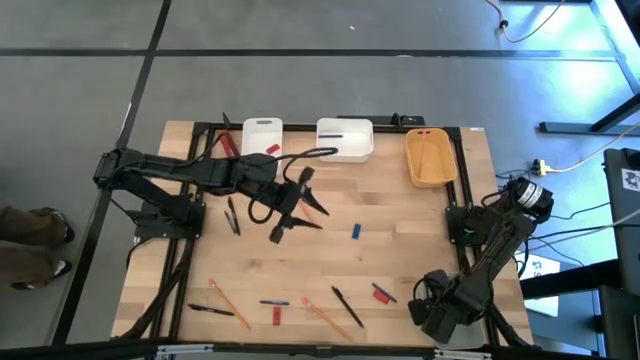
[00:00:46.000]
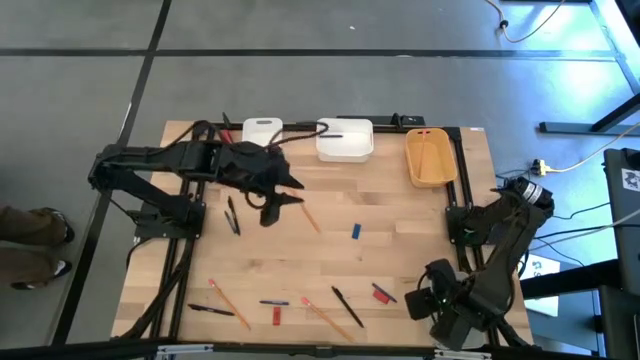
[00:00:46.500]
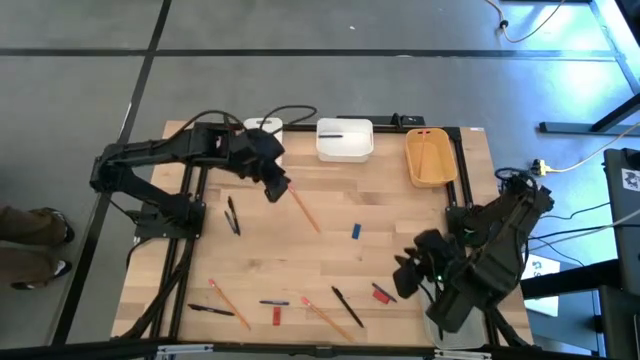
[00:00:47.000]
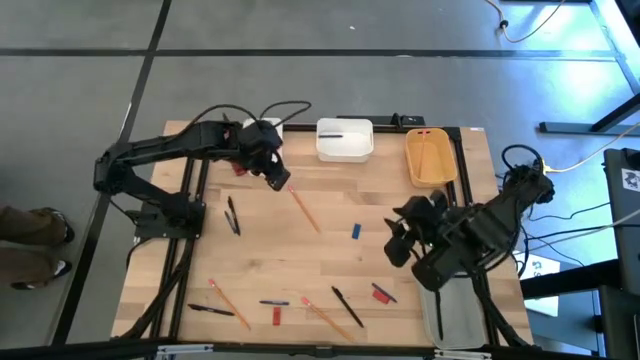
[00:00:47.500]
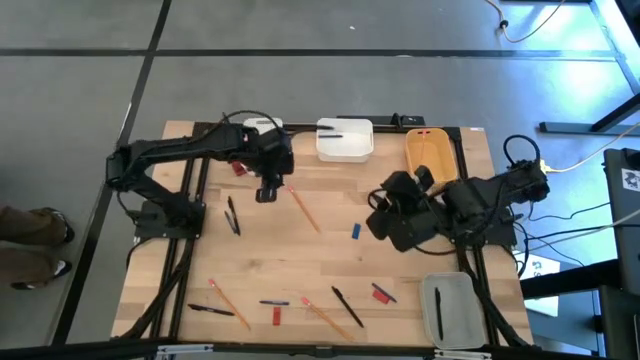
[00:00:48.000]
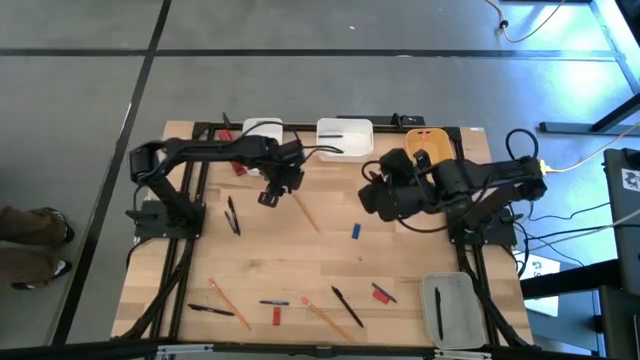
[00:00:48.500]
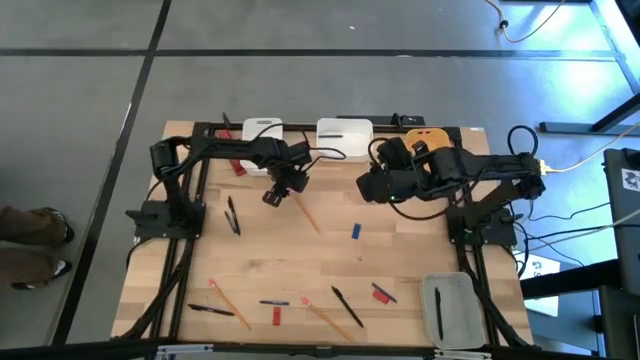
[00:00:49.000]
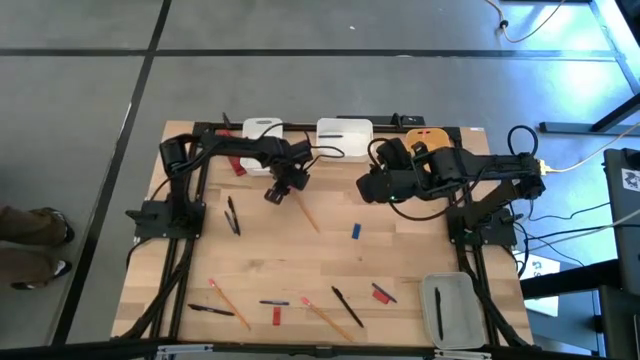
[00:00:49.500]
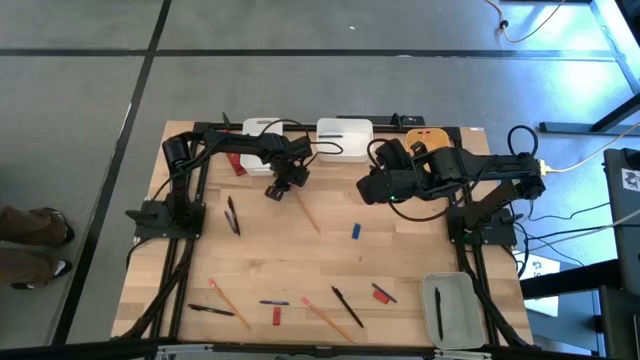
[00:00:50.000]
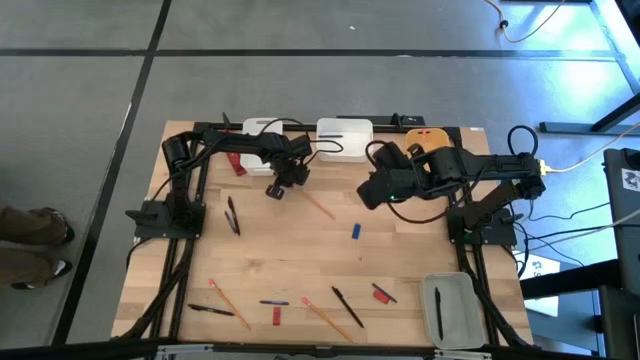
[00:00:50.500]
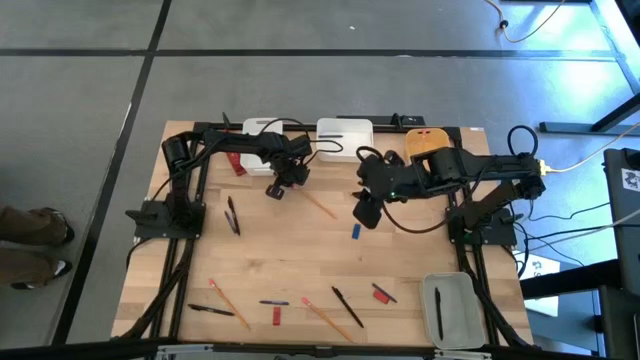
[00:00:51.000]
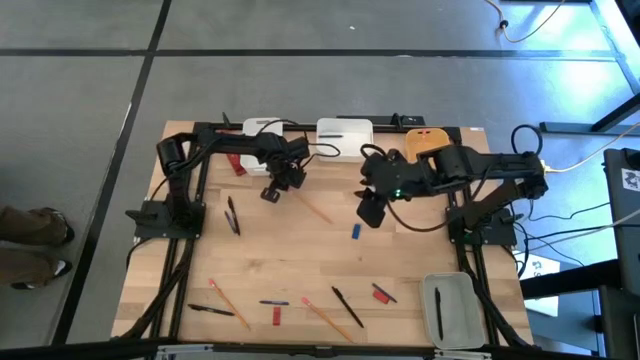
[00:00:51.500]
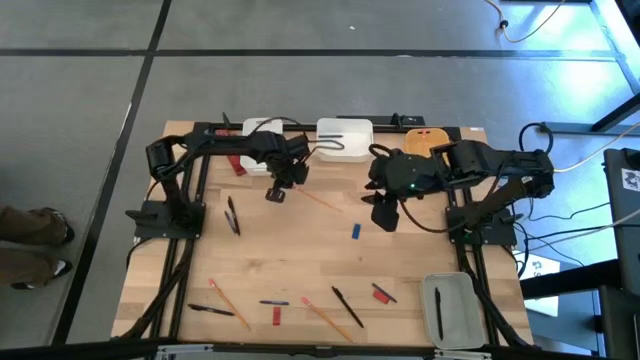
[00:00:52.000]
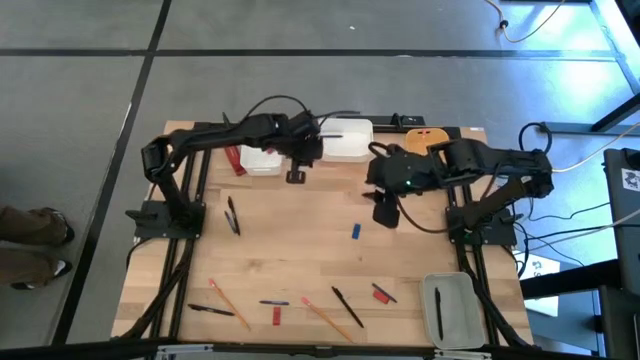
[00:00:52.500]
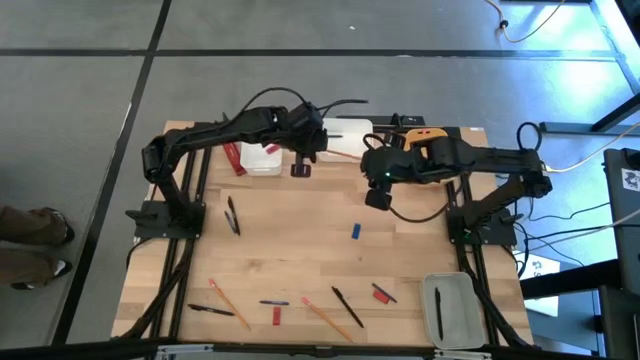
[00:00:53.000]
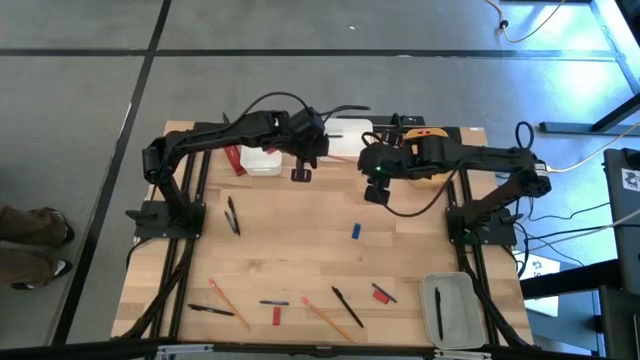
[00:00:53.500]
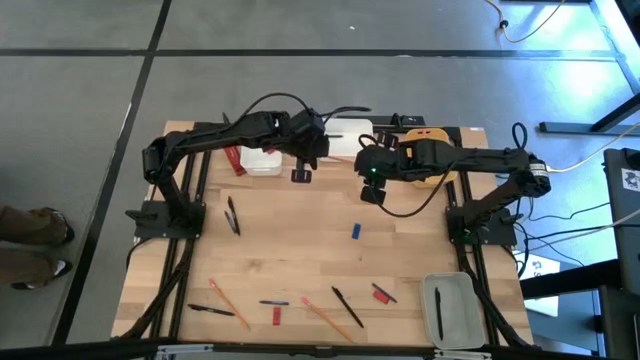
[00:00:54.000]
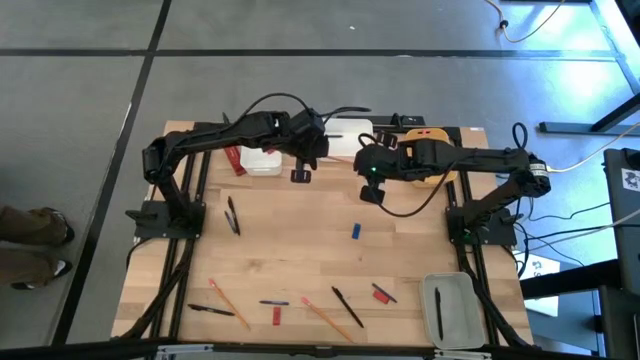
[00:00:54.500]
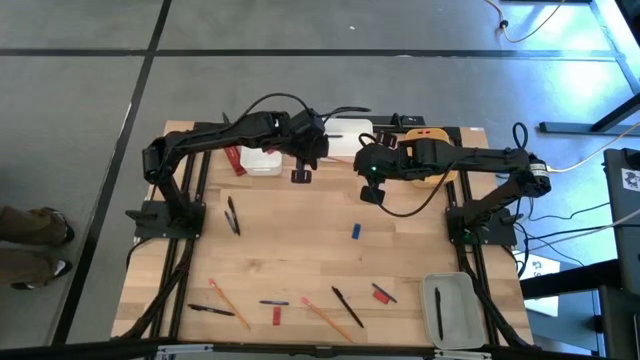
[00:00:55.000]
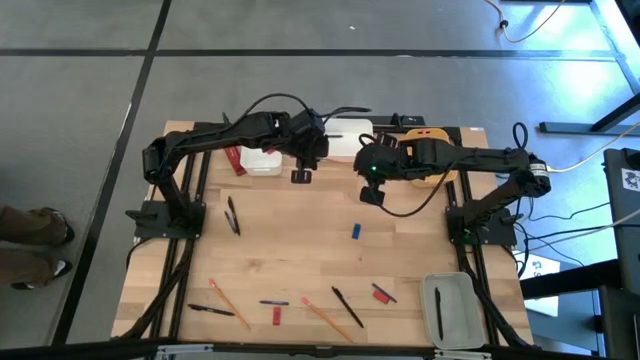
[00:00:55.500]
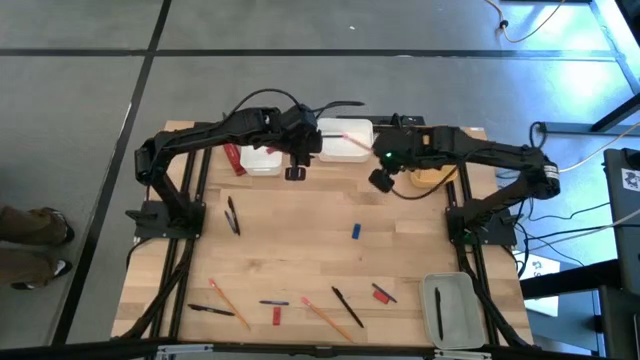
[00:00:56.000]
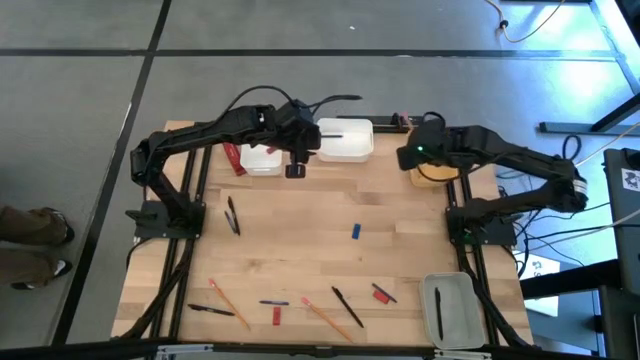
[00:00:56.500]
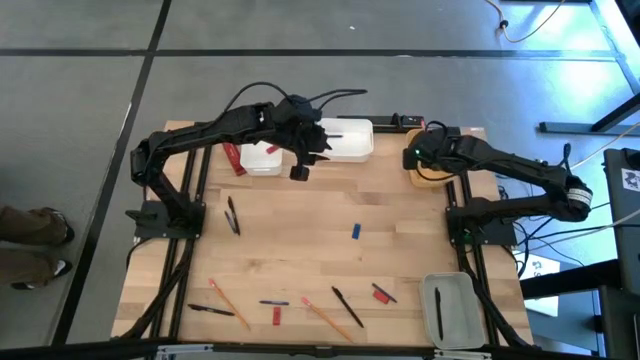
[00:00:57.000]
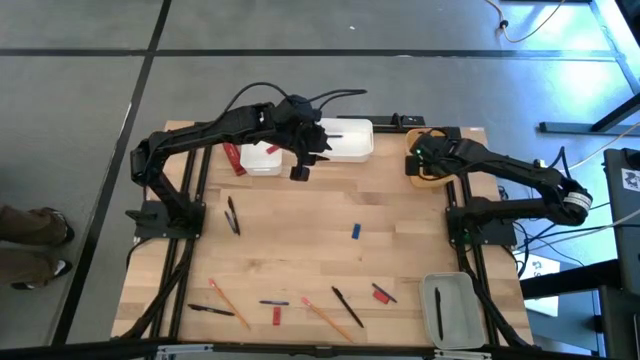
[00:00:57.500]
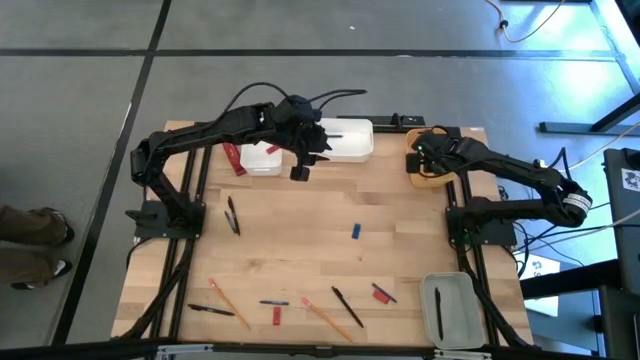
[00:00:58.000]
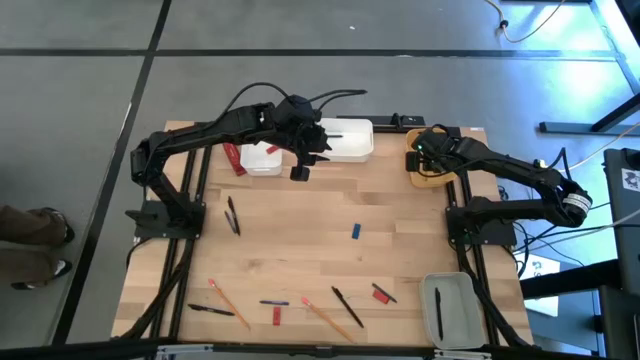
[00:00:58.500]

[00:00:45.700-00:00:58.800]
Task: Sort crayons/erasers/pens/pencils in bins
Put the yellow pencil into the yellow bin

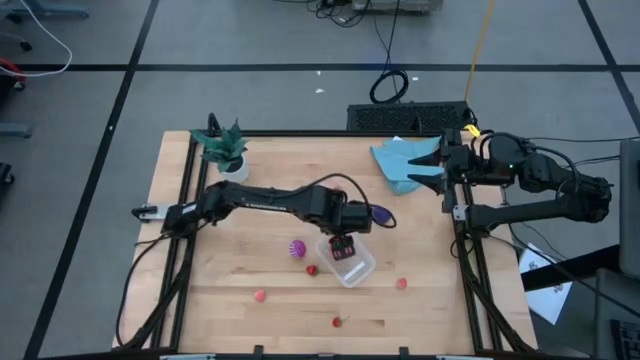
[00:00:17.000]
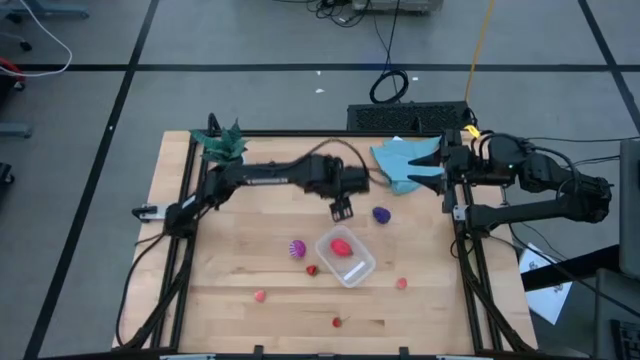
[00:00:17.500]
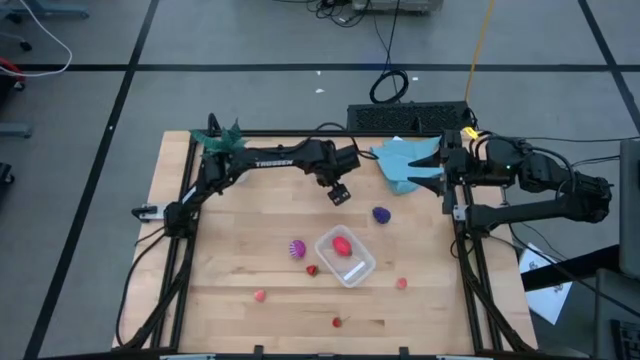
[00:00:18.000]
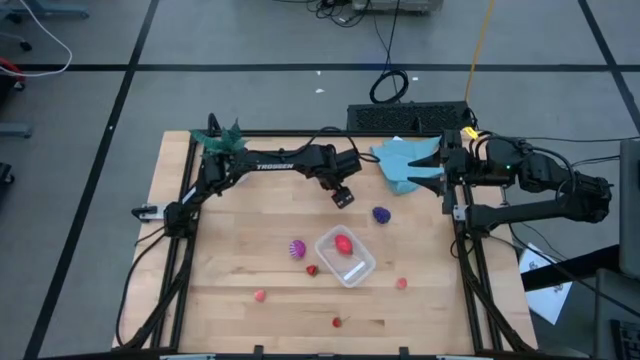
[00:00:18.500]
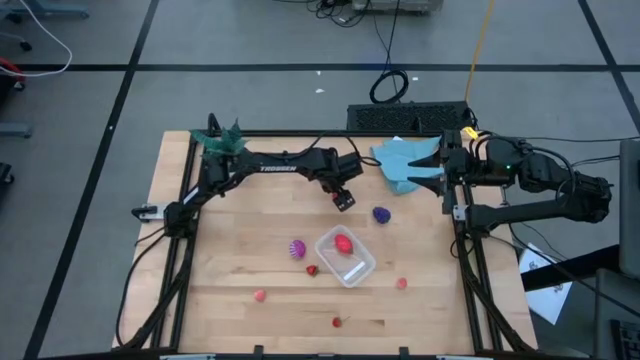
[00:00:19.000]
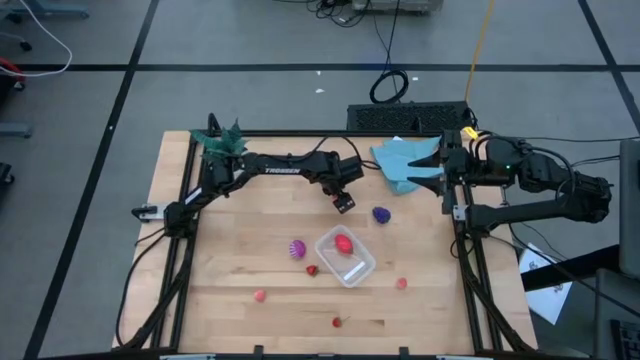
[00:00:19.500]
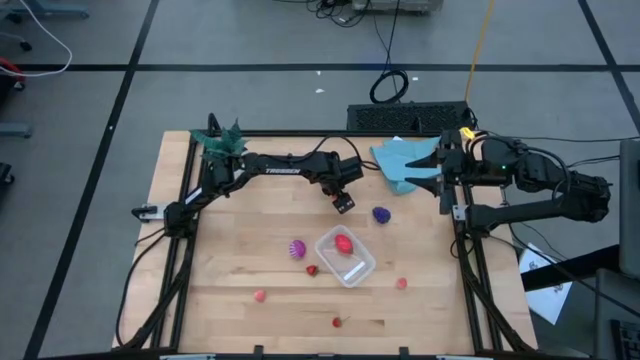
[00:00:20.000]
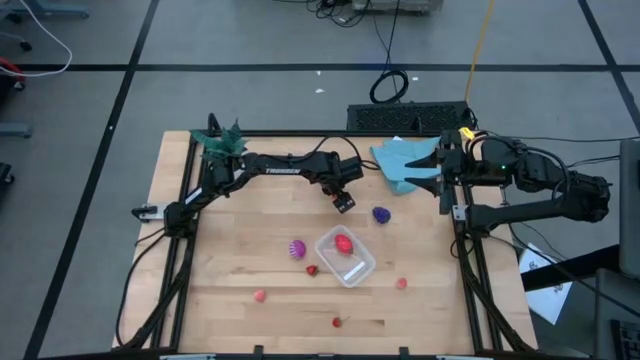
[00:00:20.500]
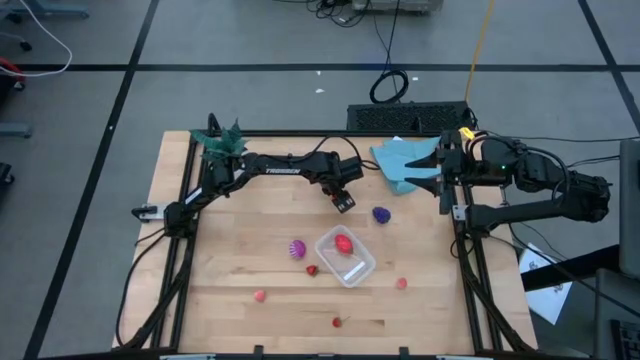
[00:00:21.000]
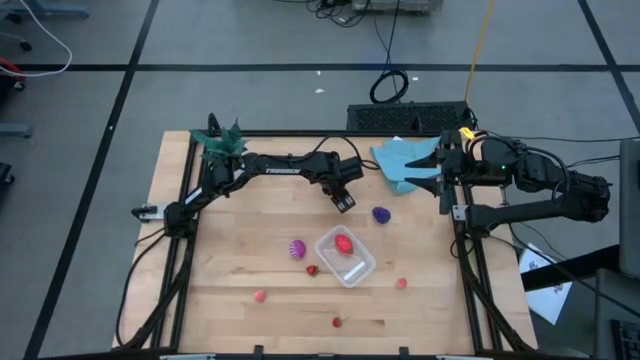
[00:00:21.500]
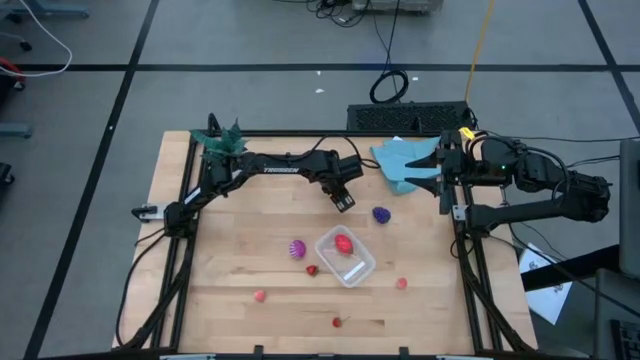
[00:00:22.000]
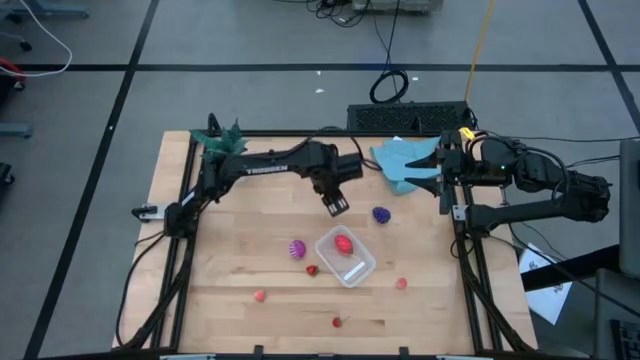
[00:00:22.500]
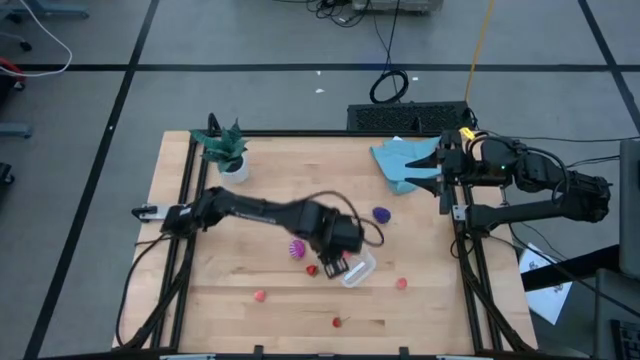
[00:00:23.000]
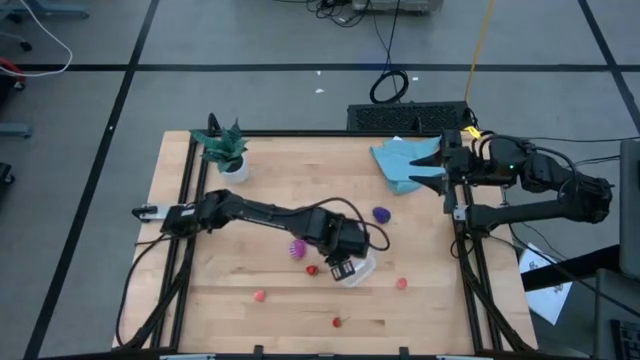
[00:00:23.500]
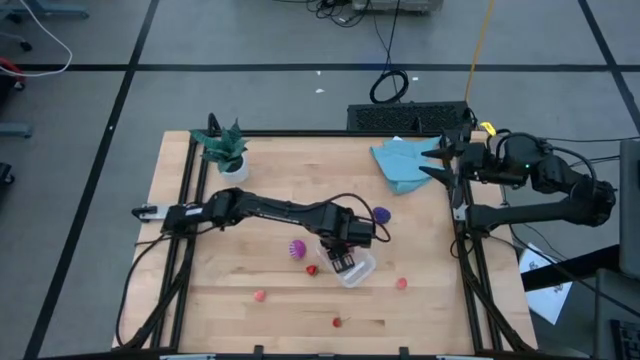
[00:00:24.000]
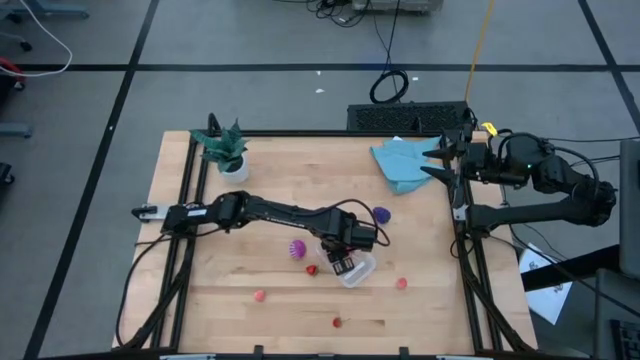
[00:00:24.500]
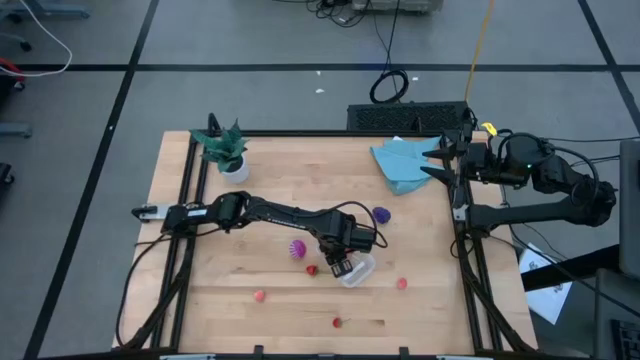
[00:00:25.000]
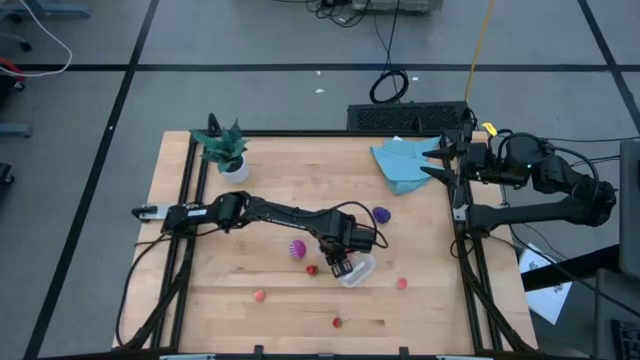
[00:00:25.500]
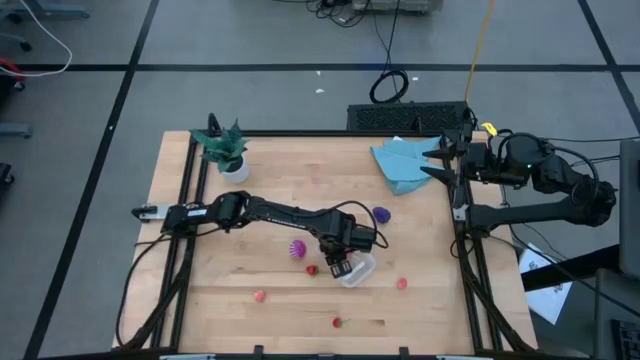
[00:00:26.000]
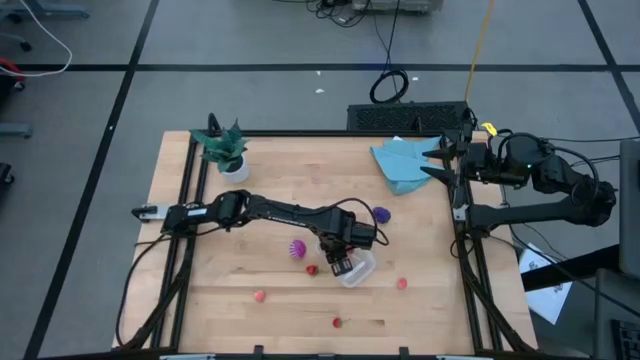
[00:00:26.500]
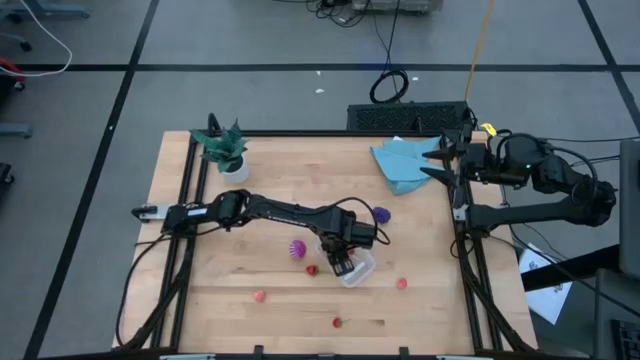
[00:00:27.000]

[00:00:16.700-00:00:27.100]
Task: Pick and placing Produce into tupperware
Put the top strawberry into the transparent container
